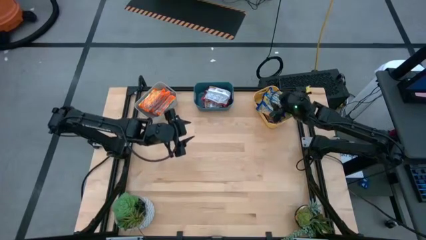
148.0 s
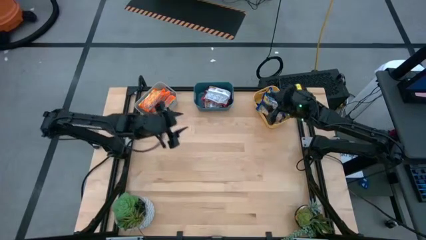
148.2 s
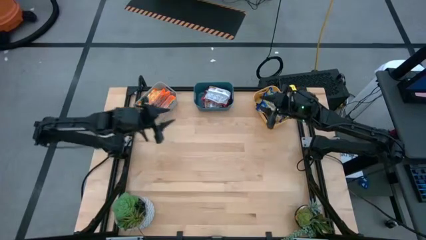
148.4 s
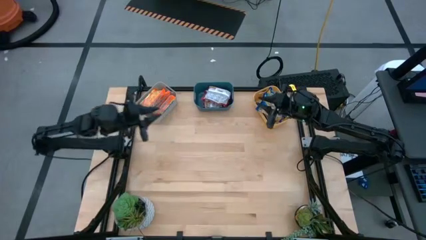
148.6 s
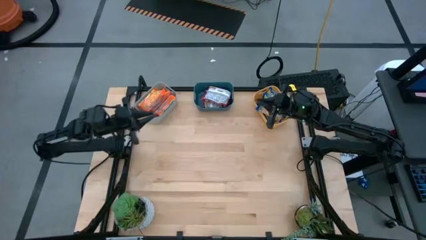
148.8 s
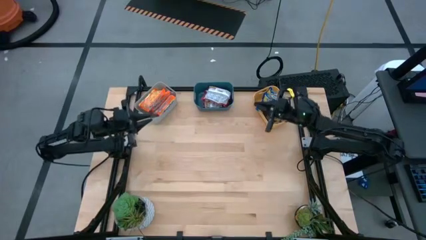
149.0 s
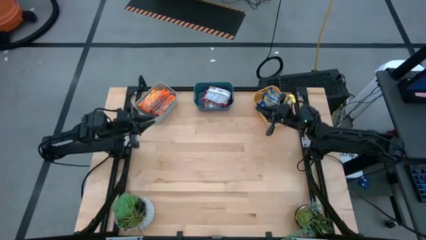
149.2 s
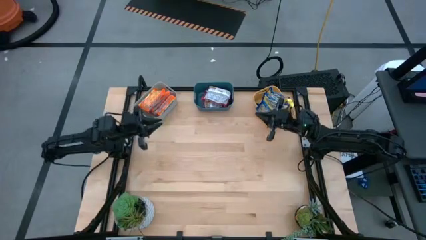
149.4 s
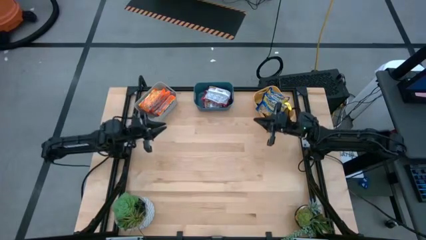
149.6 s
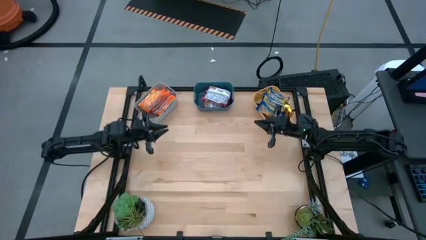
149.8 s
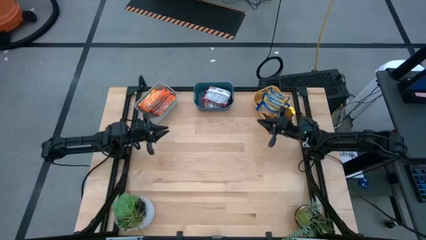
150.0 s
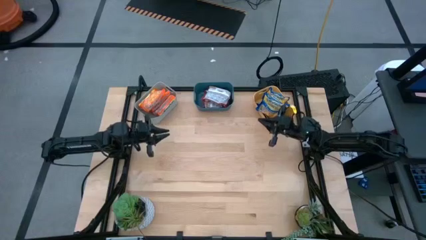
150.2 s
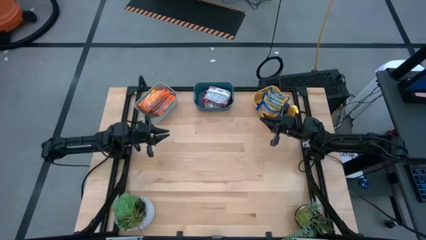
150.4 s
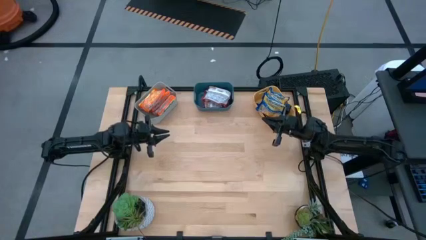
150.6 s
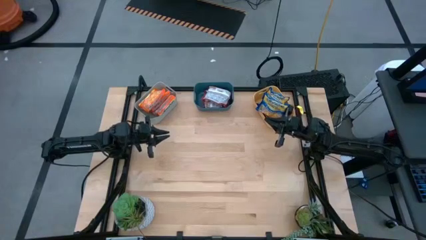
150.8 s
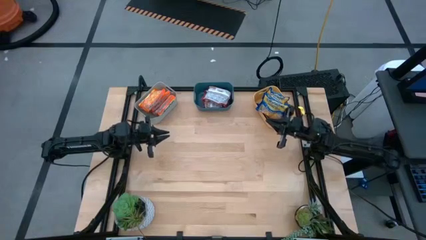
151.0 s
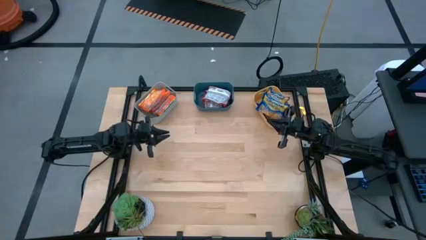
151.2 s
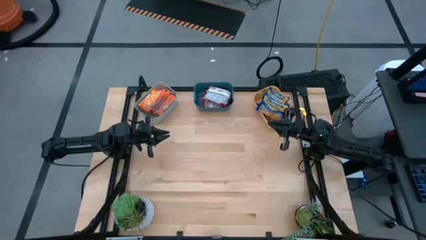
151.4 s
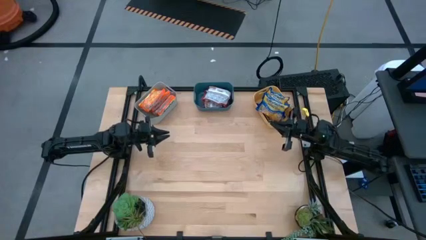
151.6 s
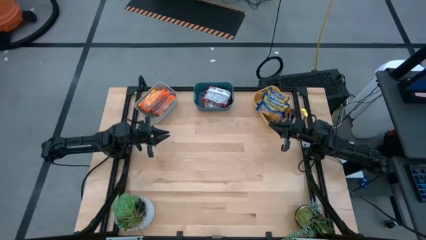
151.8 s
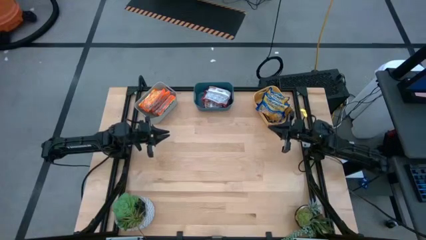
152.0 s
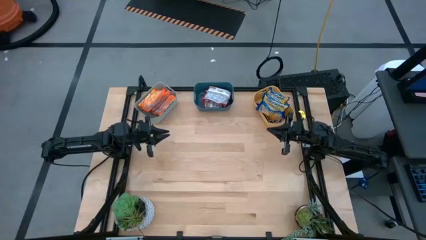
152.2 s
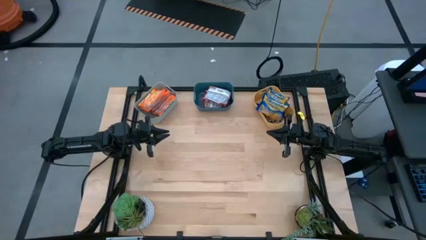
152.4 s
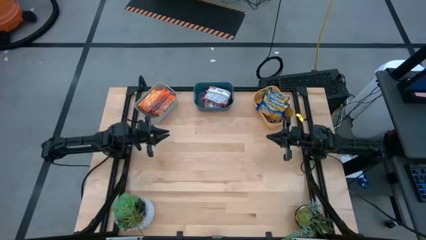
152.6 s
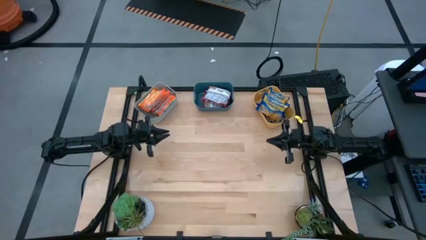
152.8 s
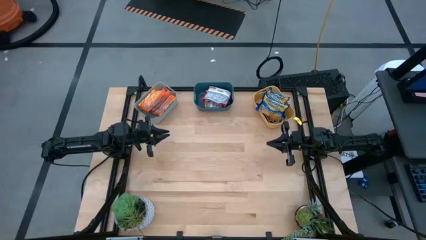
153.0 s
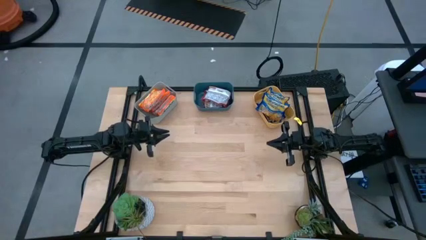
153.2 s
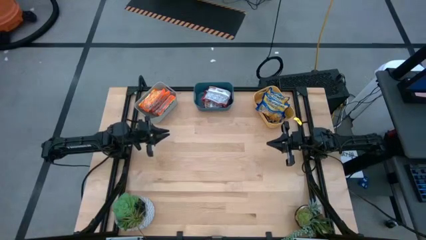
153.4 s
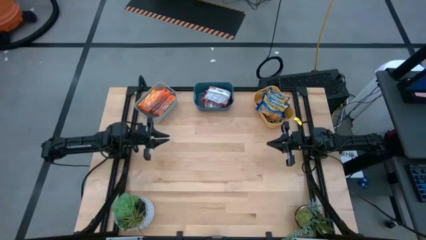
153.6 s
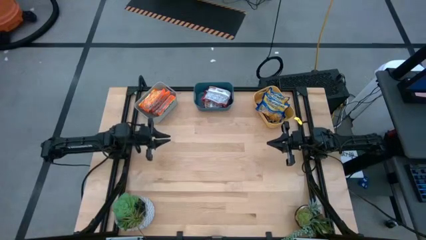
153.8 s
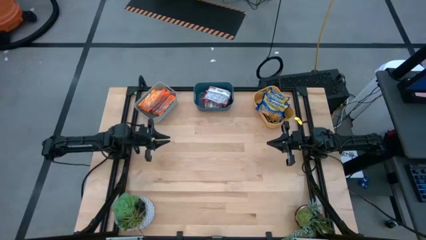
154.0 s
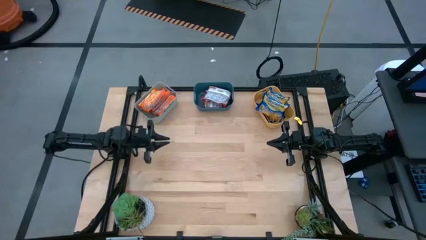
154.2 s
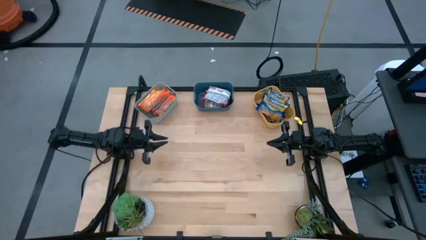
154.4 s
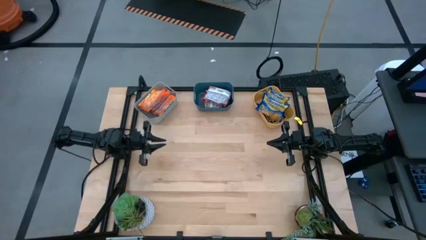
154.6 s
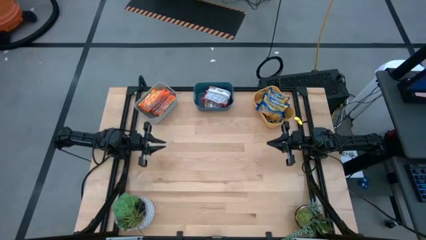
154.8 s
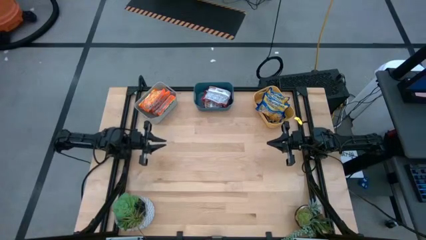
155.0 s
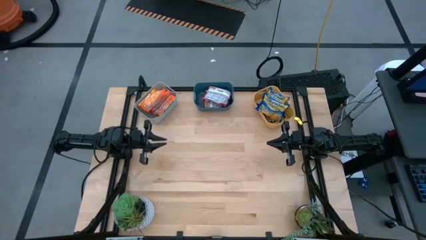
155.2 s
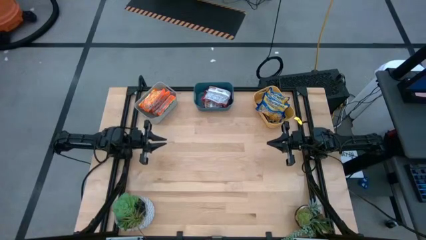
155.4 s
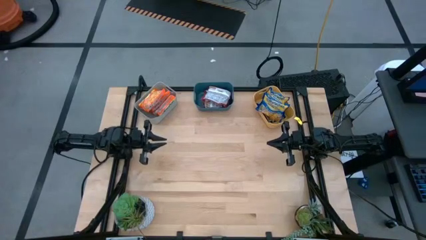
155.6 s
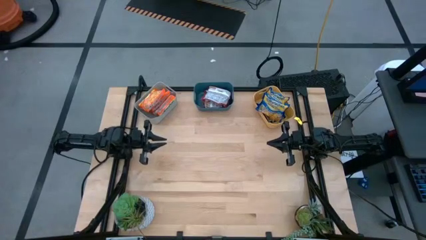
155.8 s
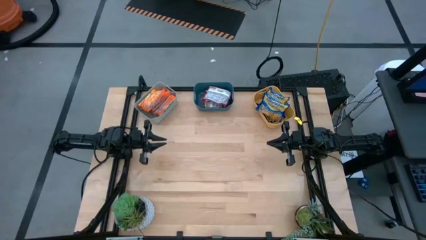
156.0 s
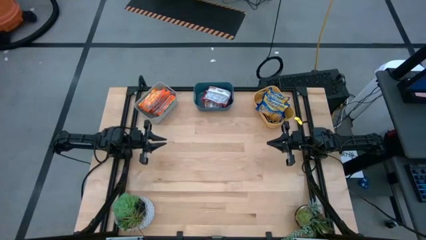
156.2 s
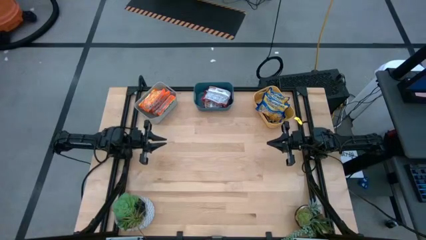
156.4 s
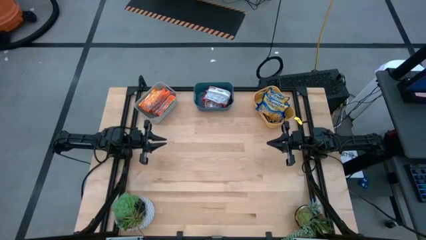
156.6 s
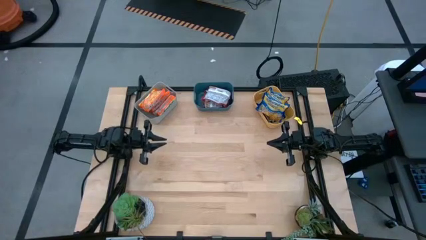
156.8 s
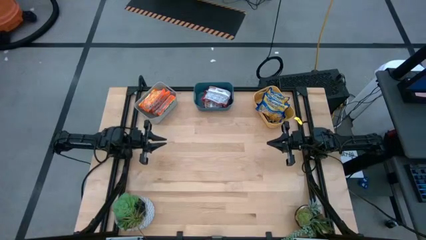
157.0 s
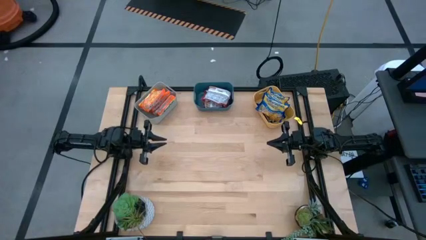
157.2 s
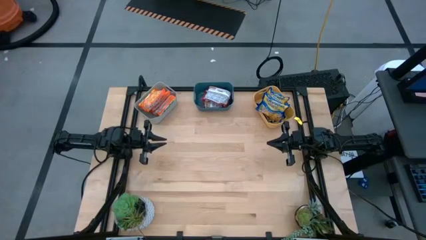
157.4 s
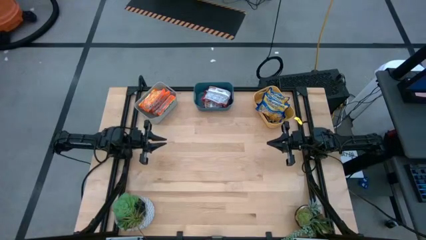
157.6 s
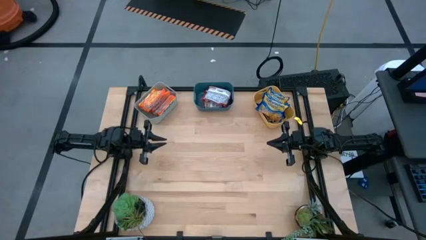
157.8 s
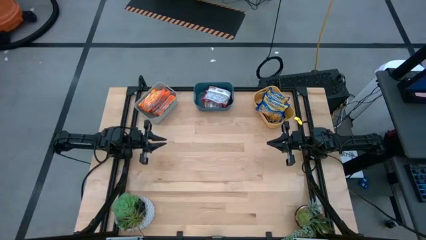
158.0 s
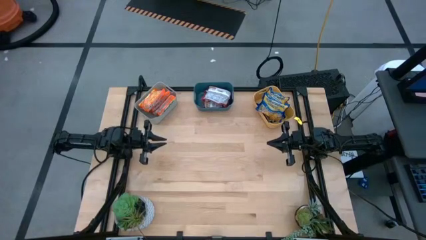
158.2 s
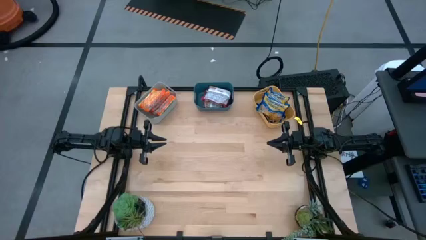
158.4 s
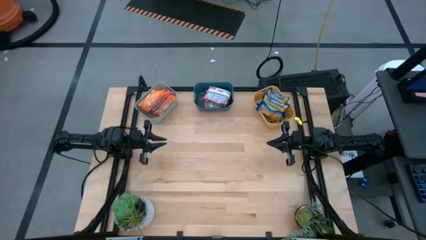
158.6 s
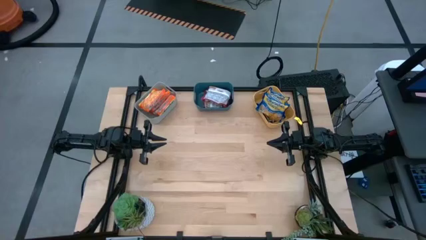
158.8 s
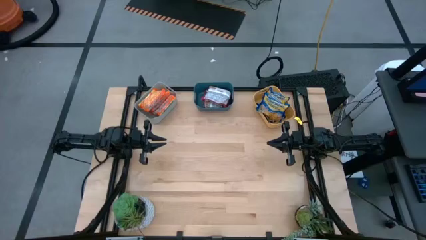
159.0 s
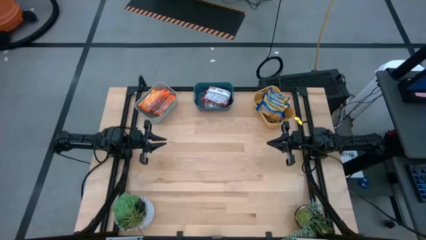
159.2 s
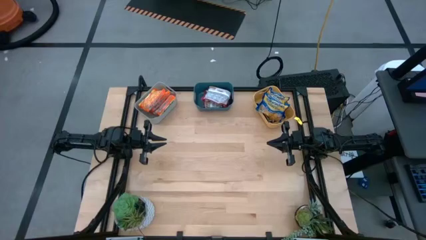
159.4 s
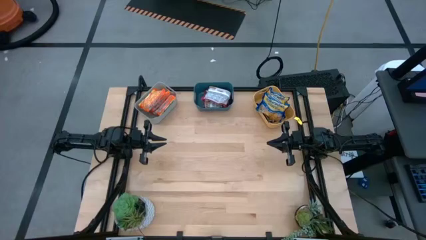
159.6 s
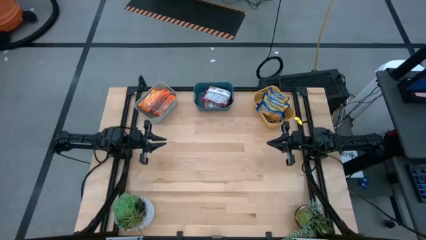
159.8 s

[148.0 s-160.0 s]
Task: Sort Maruchan noodles
Return to Home Position

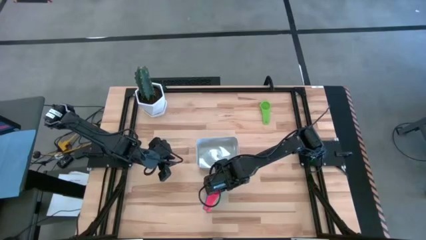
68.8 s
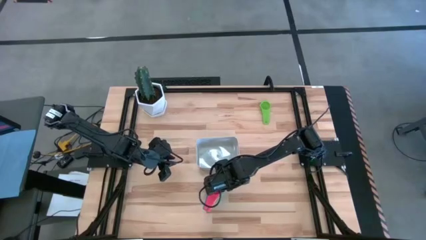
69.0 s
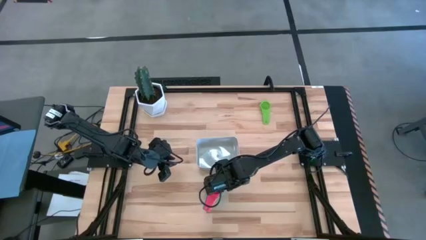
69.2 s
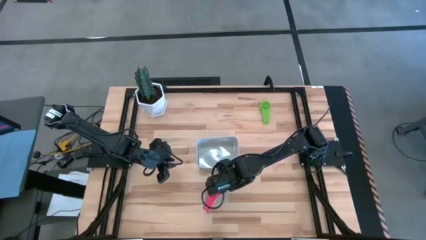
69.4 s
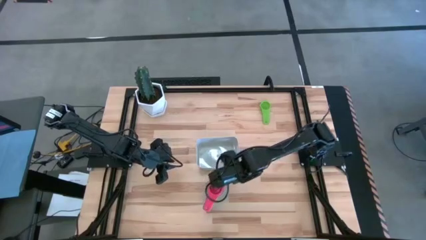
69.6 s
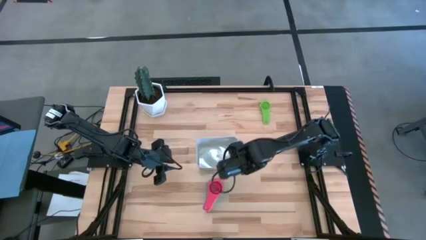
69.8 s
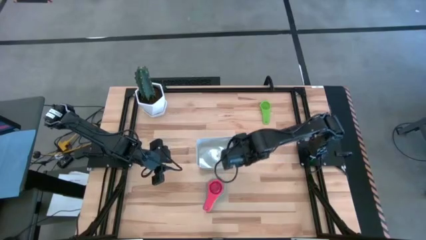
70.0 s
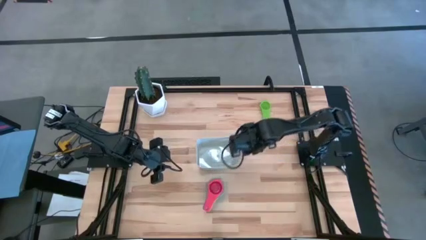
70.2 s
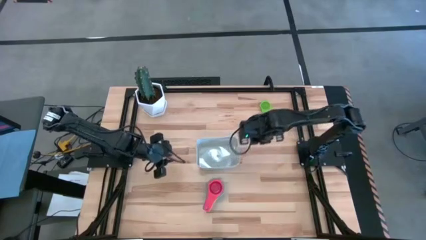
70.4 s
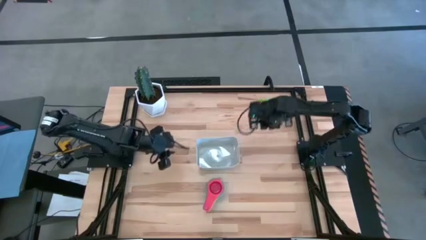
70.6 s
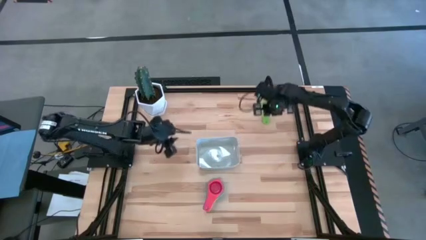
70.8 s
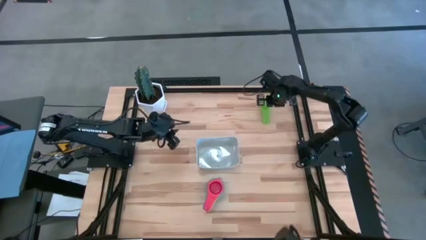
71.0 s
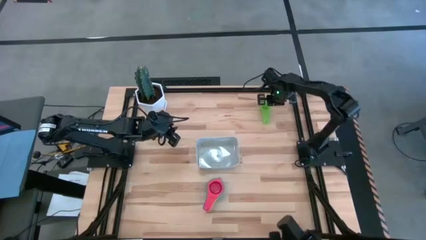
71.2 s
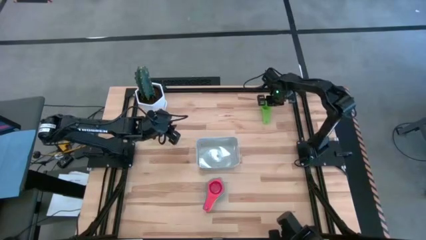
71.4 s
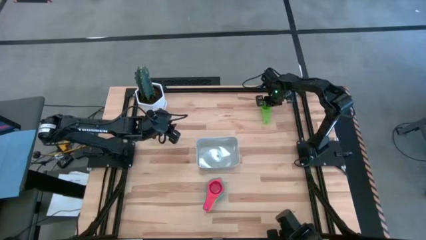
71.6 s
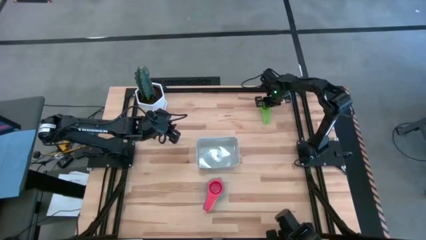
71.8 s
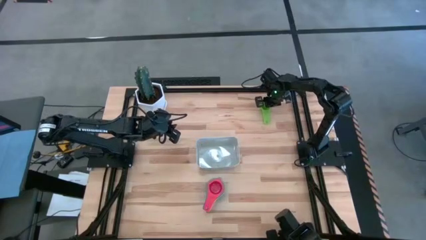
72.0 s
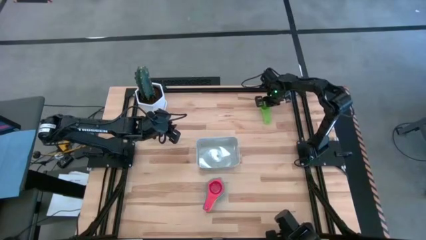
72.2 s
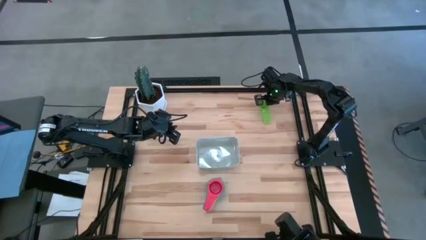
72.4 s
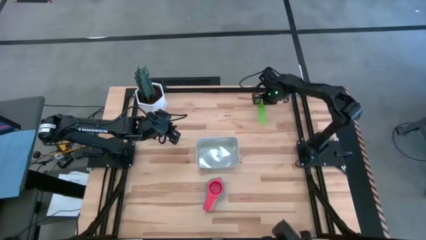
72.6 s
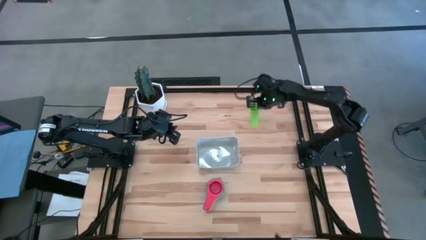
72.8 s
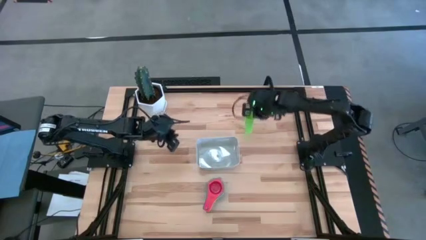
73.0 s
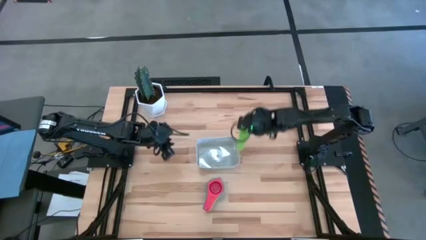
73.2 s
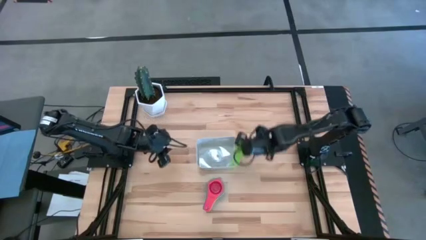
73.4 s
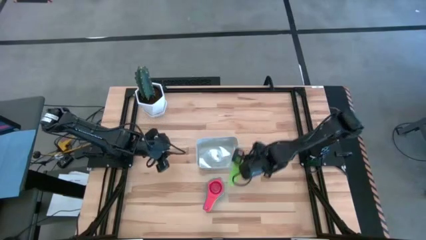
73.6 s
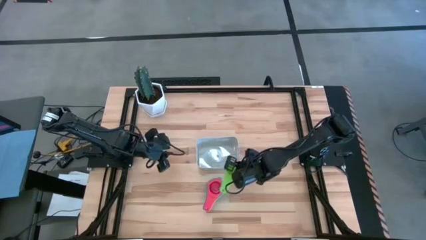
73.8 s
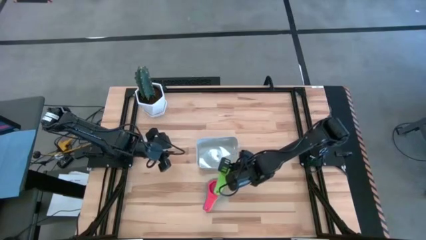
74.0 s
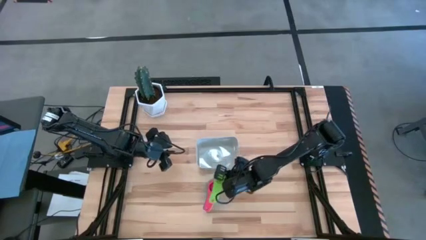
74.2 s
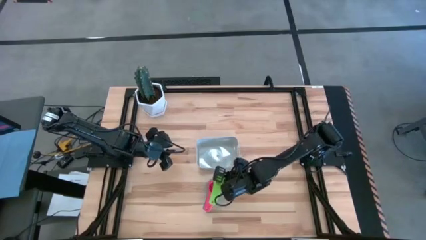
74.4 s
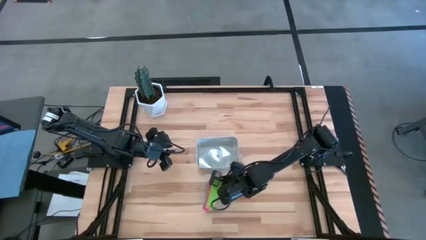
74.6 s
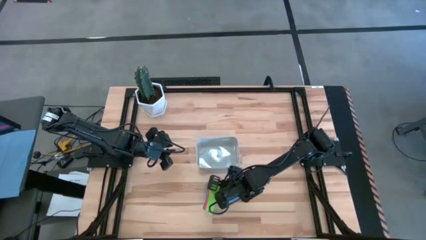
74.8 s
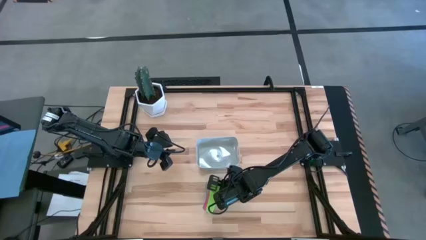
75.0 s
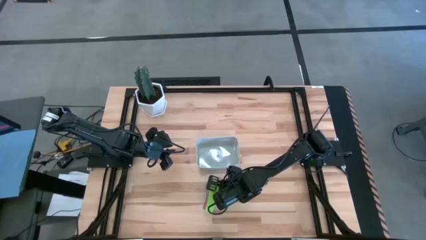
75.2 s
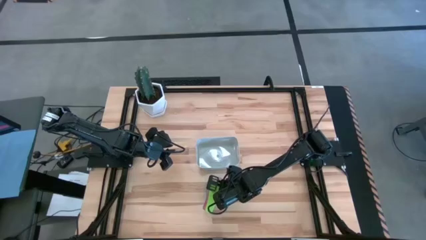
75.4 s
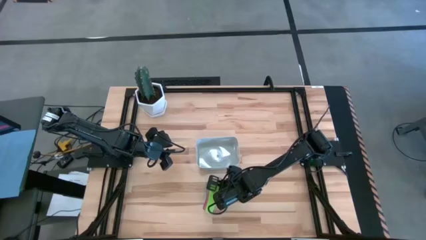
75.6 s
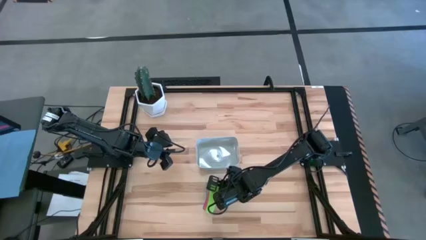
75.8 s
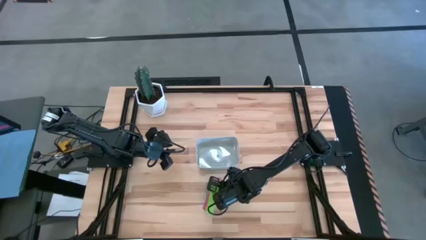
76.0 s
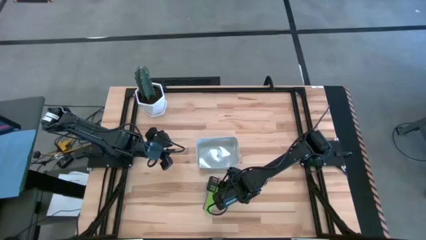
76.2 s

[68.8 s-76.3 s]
Task: Nest measuring cups in basket
Stack the green measuring cup on top of the red measuring cup
